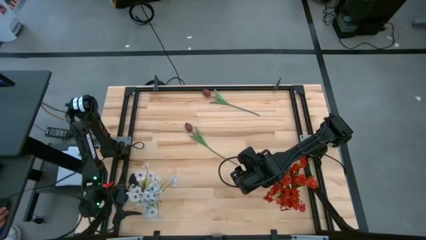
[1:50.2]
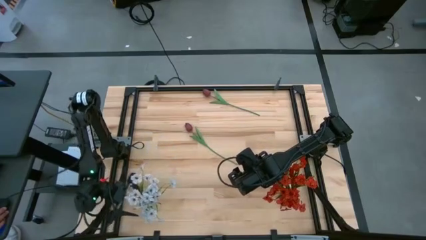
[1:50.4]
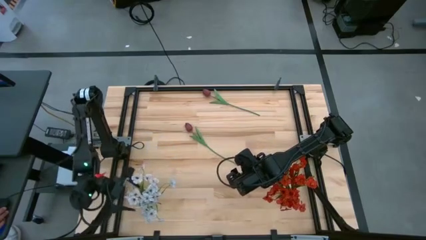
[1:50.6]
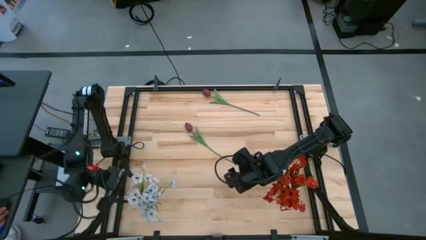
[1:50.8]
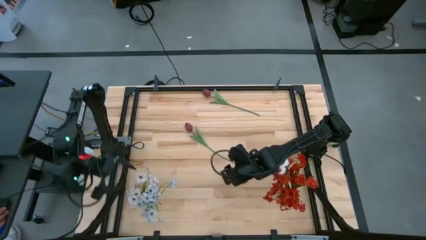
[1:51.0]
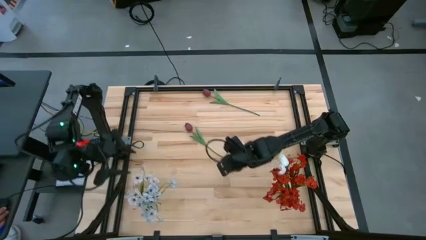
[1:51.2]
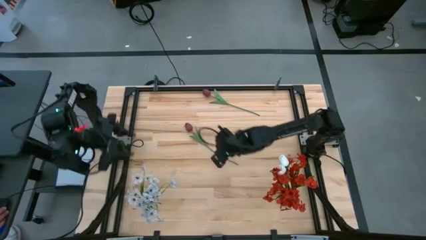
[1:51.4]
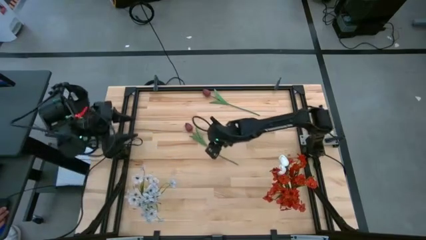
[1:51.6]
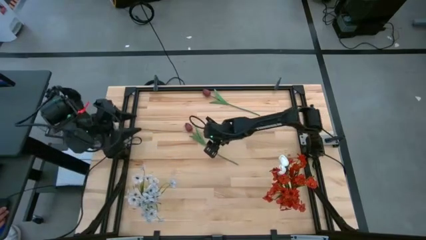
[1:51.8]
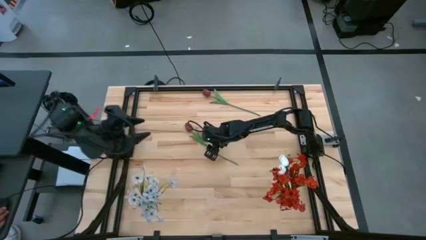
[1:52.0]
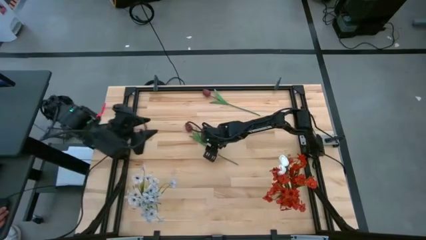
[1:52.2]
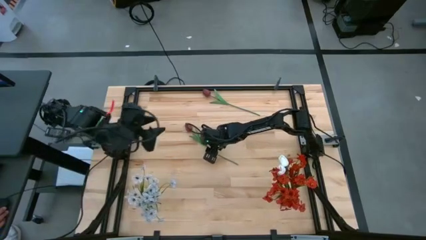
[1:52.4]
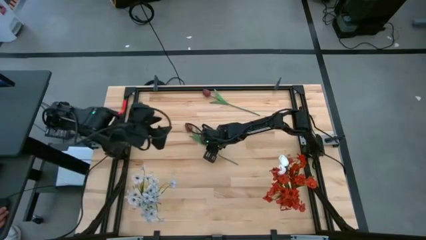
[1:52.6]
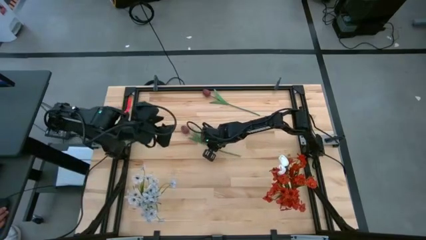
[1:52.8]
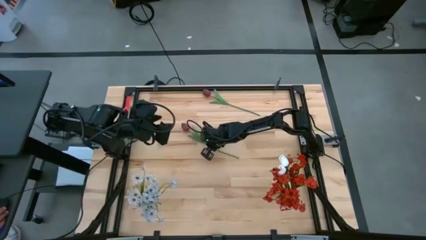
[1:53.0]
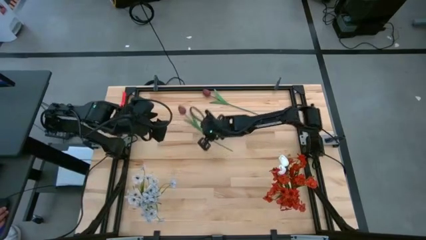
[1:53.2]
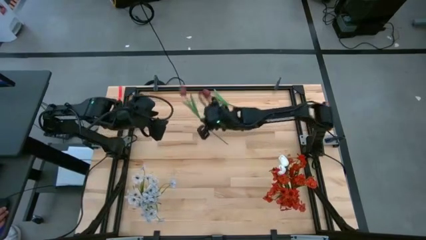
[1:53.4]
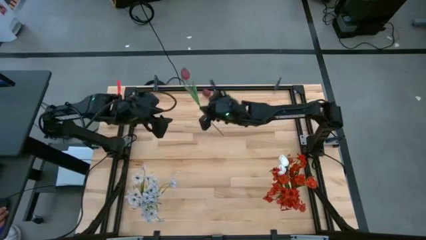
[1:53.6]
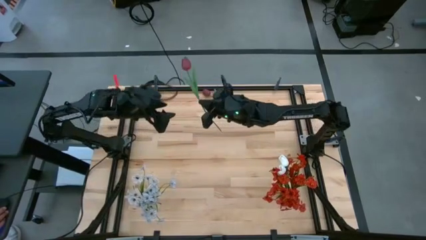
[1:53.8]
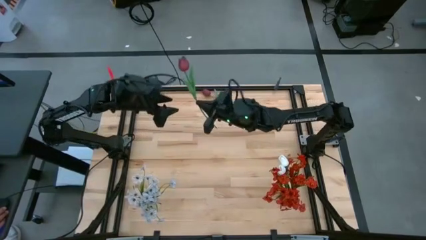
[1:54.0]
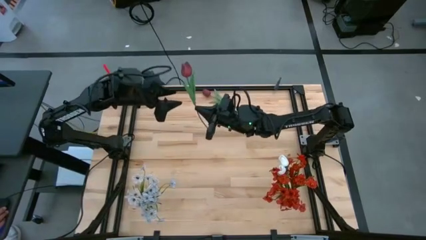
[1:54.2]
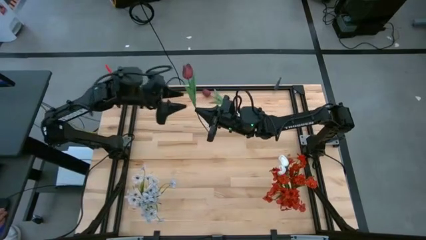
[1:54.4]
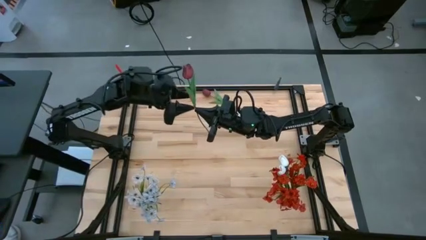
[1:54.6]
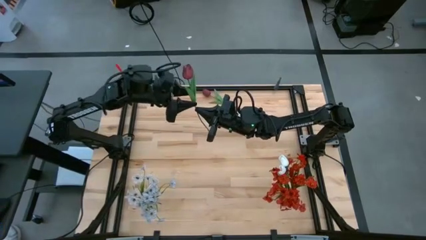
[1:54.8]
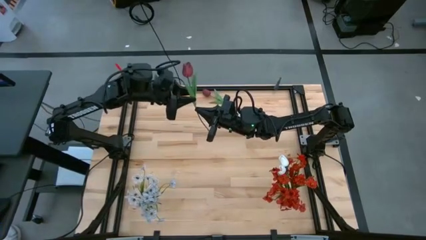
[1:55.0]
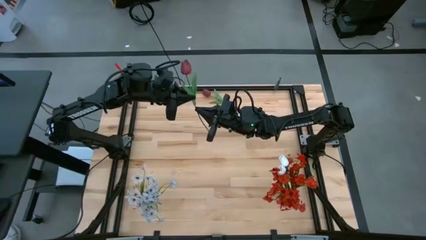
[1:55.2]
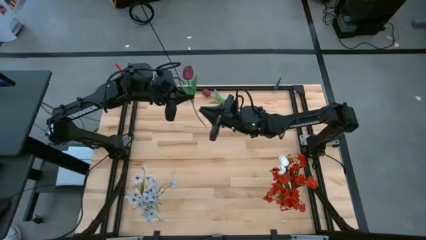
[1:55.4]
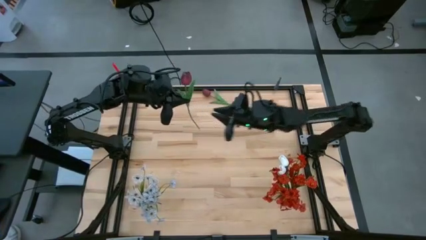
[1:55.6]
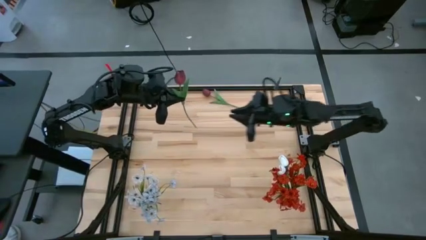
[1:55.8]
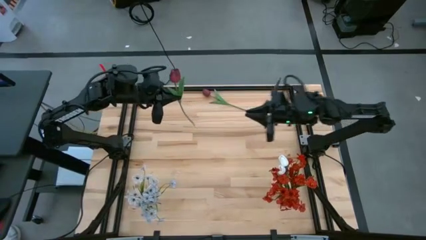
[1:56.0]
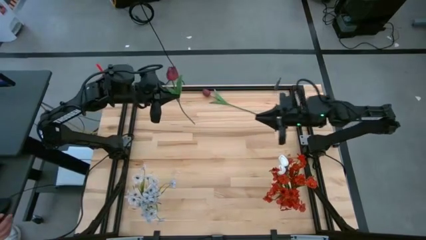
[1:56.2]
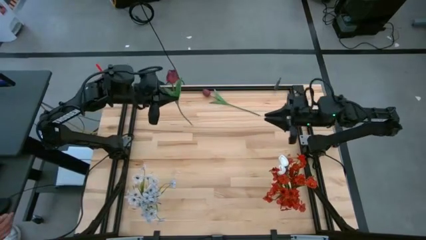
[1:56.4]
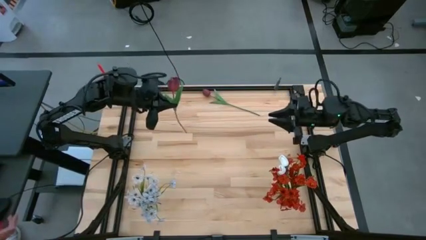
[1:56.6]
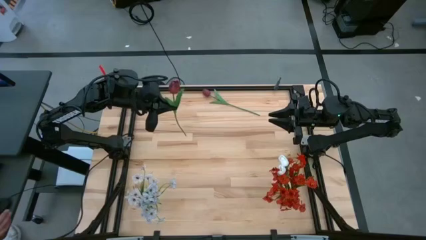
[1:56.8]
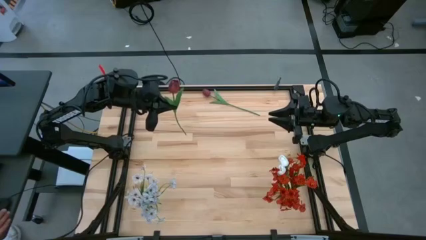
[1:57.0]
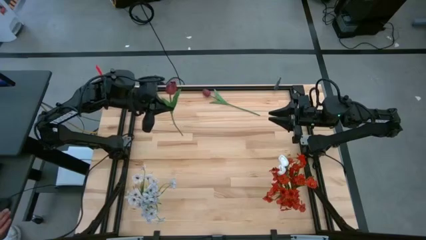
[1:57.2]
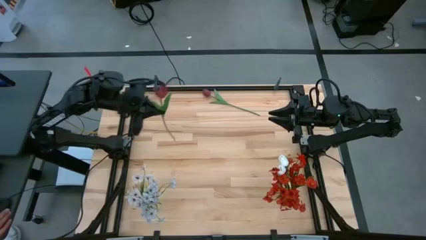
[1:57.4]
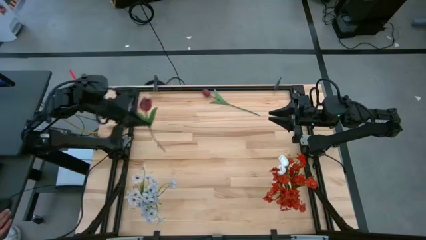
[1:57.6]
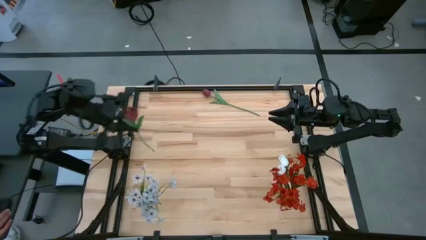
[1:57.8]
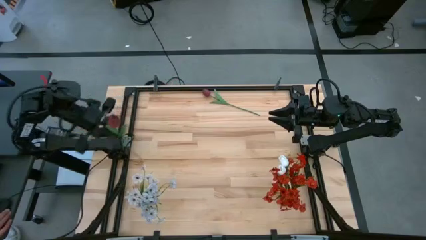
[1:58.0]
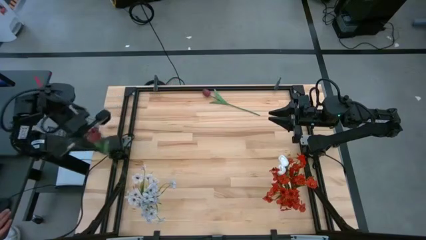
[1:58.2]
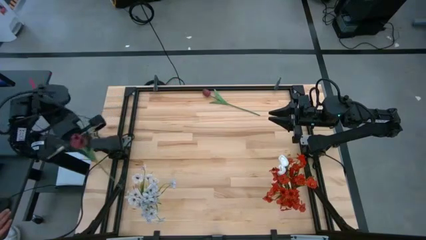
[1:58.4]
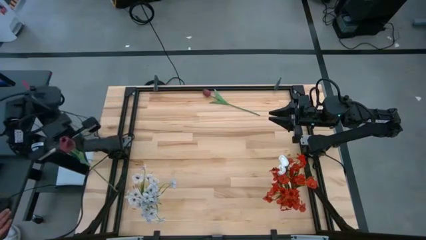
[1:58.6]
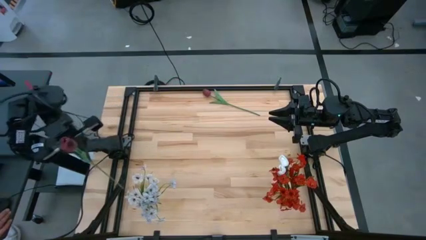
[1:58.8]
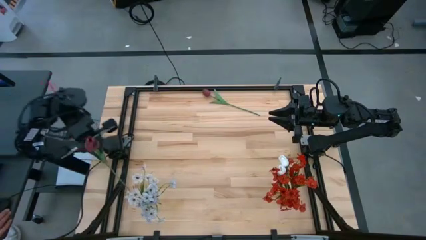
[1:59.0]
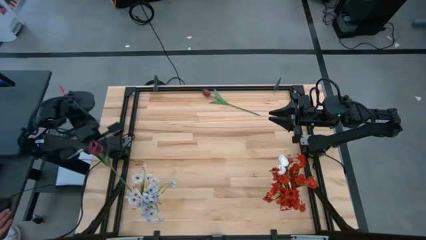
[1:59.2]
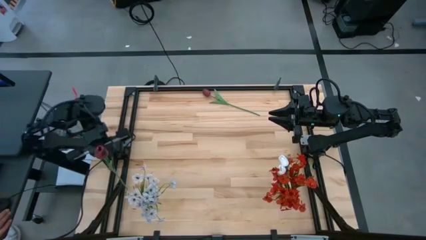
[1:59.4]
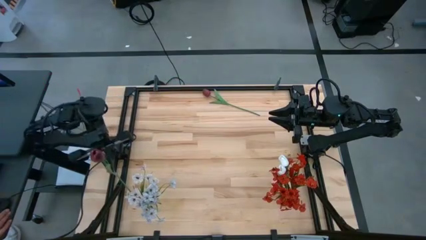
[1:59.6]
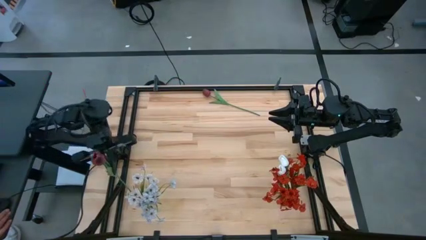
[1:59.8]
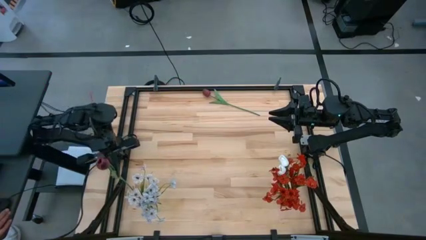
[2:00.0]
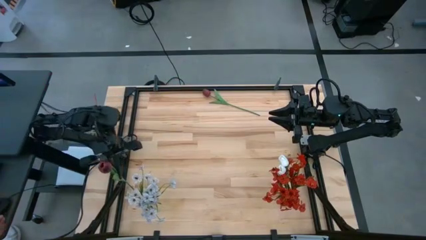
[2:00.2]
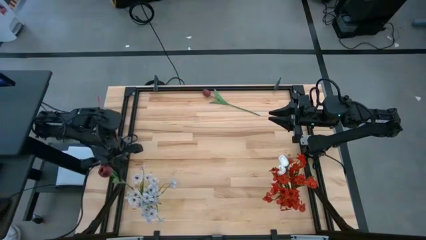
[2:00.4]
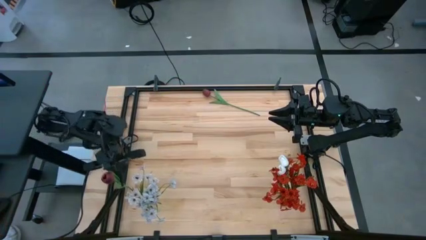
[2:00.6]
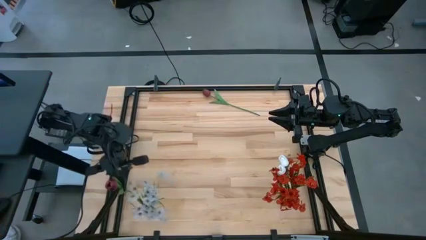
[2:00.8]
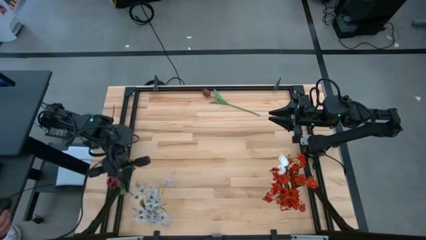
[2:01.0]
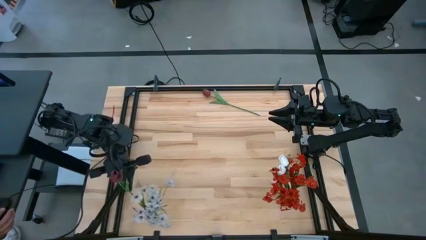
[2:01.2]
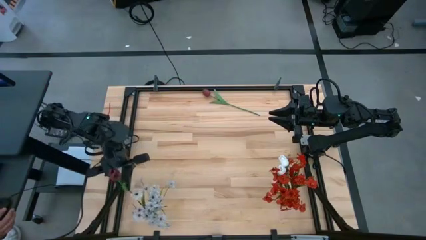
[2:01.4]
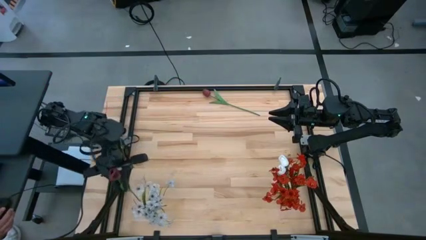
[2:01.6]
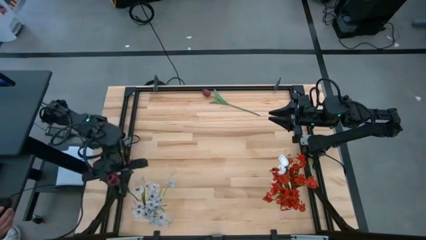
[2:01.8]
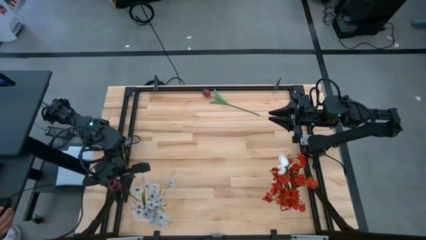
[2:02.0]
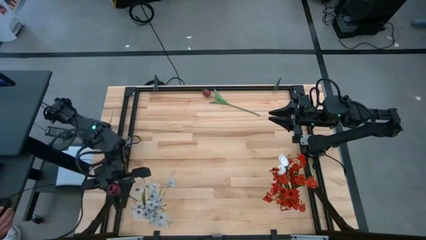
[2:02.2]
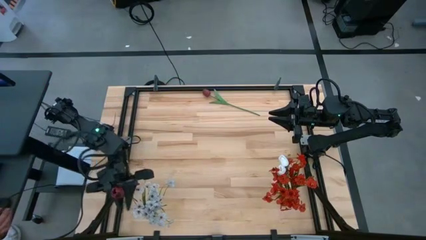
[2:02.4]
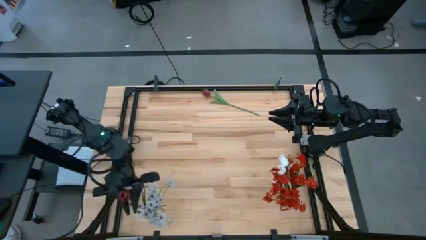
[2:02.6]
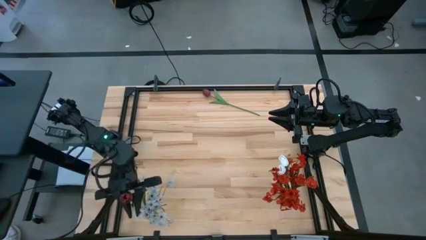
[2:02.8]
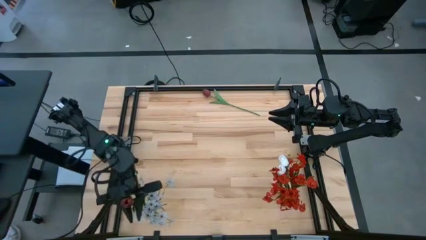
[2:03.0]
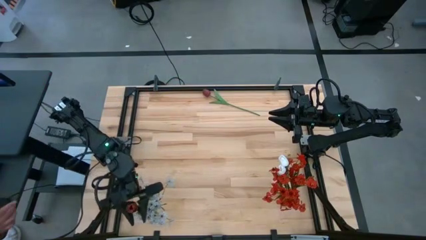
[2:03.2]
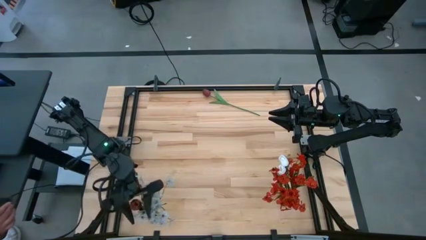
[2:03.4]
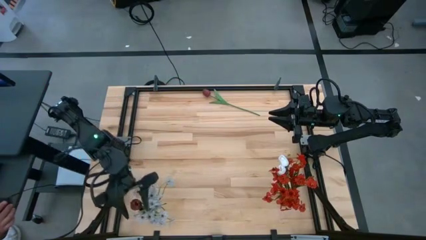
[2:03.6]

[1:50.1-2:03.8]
Task: Sort flowers into vase by color
Put the bottom red flower into the transparent vase

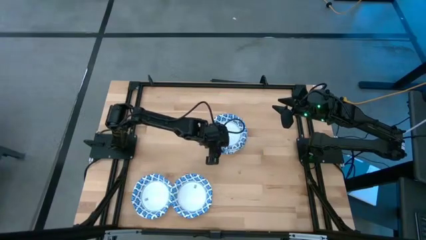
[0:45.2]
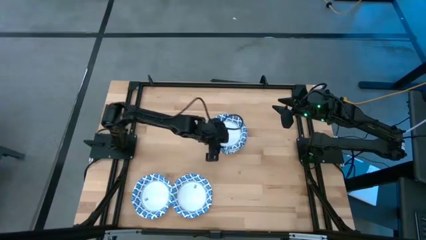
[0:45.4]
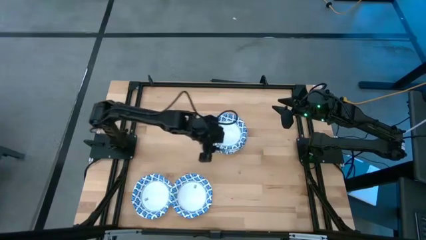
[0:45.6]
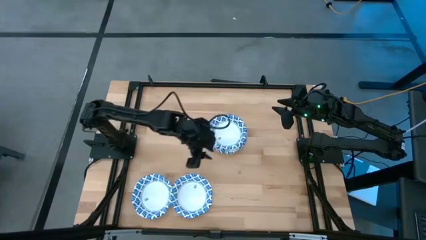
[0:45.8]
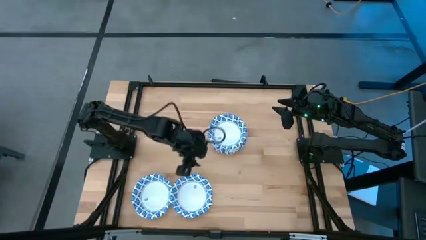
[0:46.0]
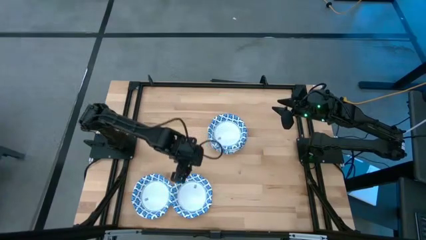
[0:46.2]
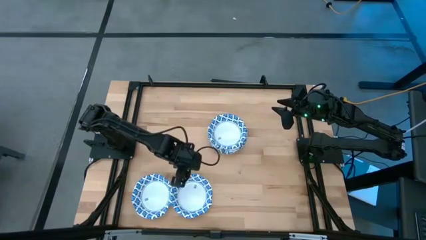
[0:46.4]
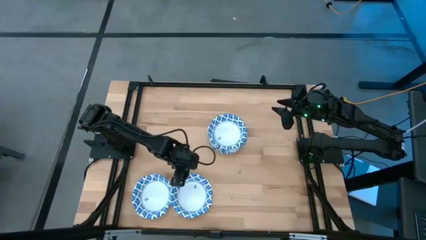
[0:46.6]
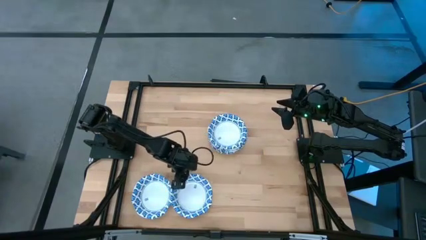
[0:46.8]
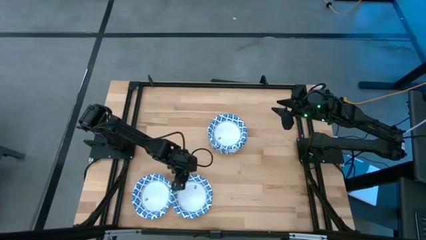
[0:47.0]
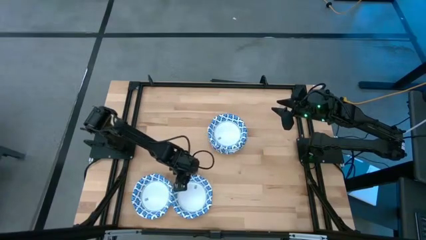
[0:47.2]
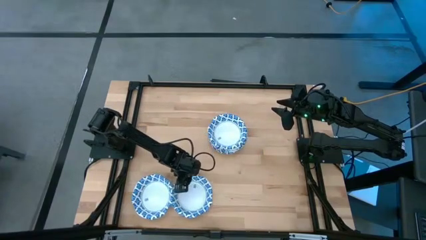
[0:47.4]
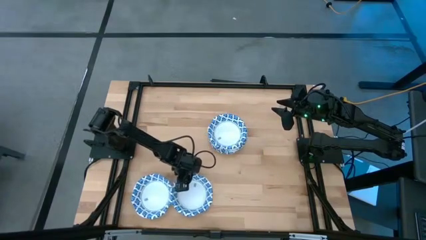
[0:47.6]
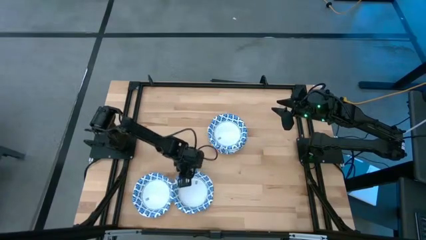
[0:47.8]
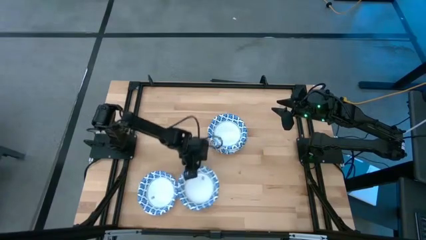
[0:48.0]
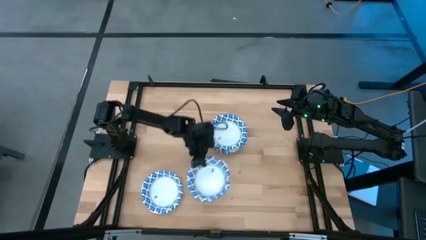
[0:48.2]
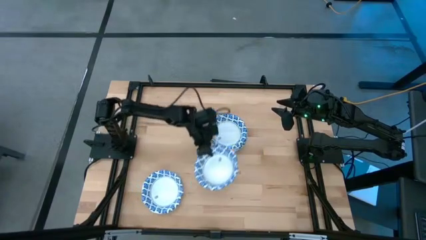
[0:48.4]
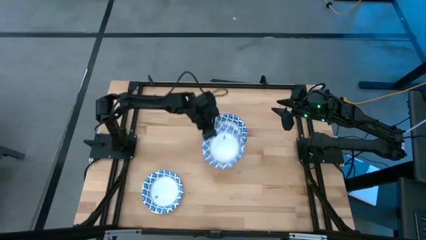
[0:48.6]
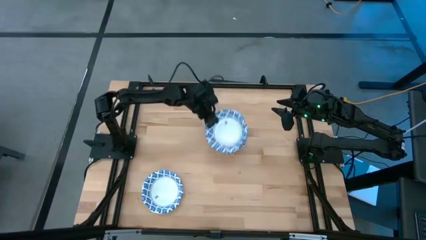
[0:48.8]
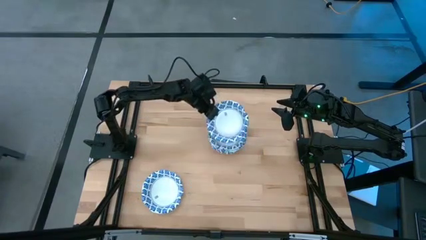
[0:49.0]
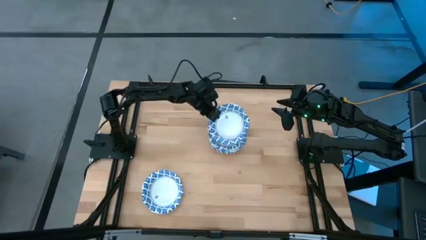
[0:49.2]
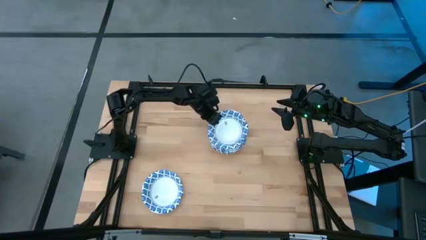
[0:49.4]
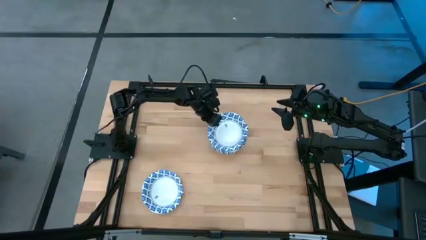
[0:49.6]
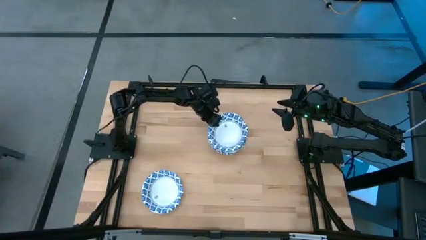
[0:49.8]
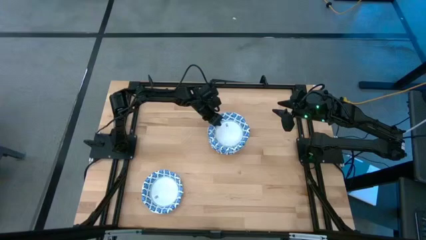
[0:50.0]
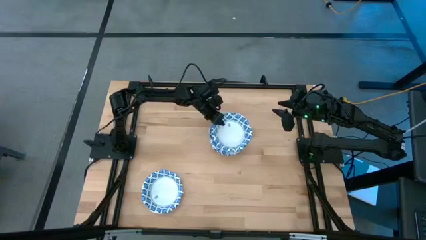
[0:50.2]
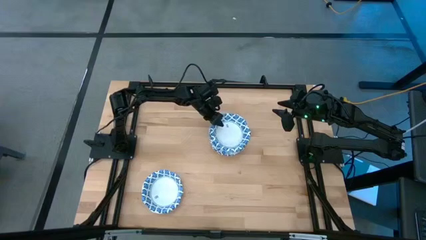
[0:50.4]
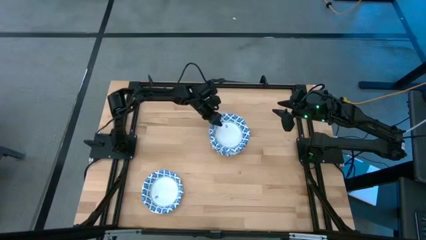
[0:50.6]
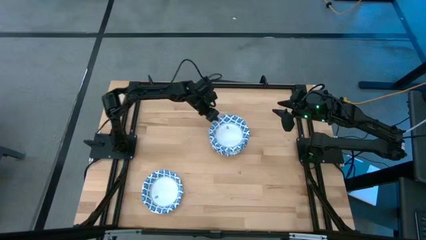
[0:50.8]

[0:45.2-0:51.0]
Task: Nest bowls inside each other
Stack the white bowl on top of the white bowl
